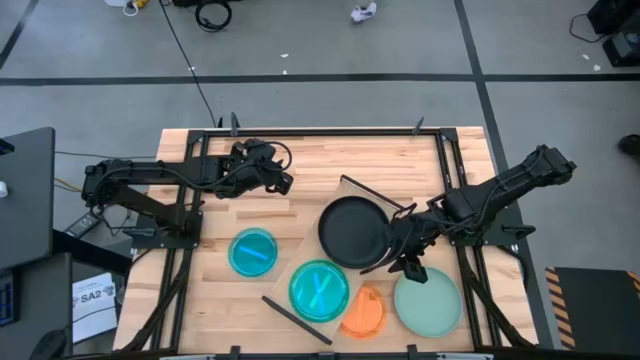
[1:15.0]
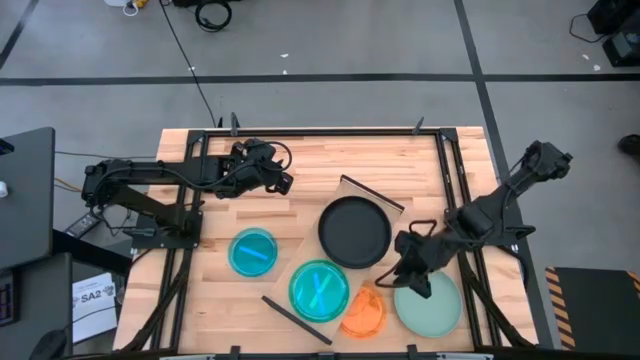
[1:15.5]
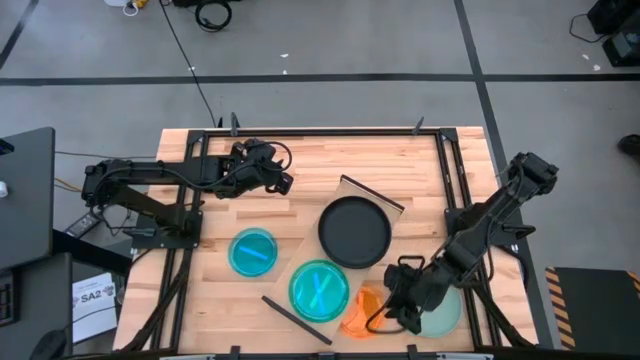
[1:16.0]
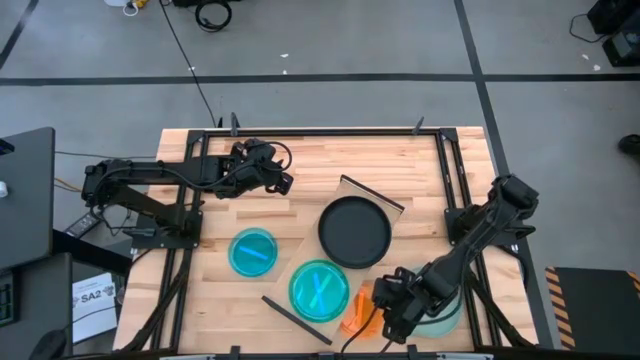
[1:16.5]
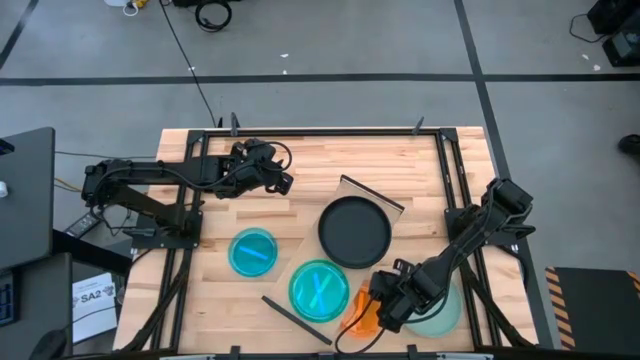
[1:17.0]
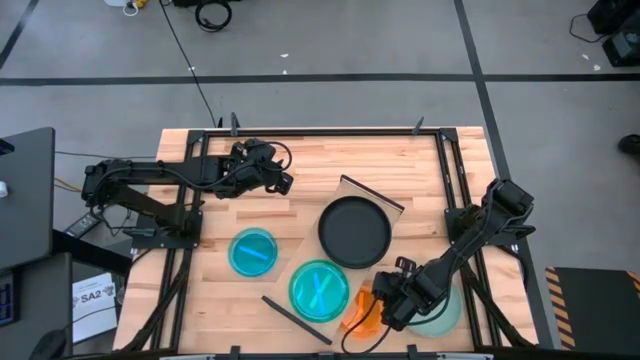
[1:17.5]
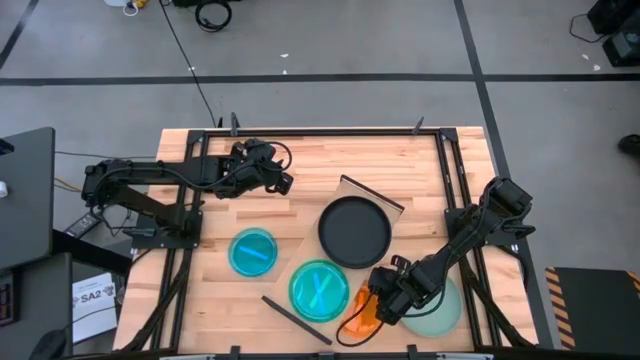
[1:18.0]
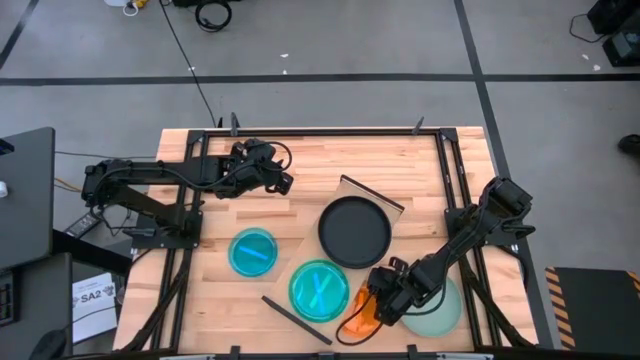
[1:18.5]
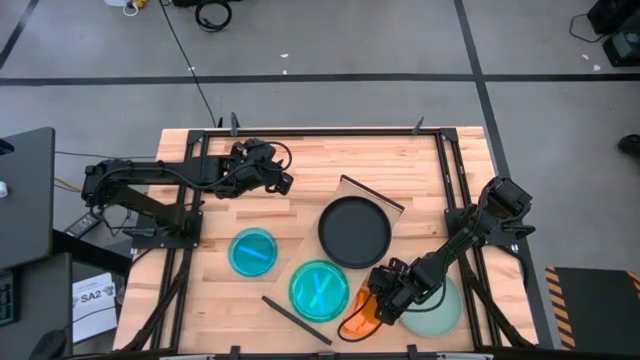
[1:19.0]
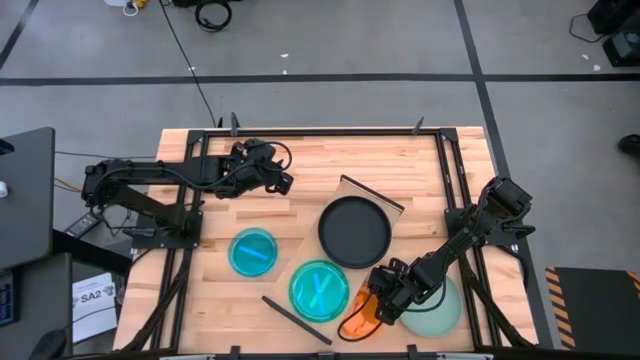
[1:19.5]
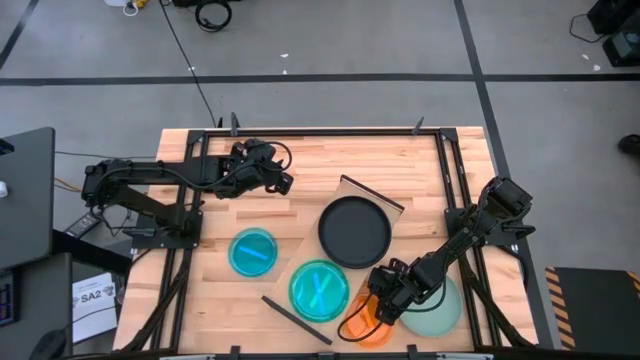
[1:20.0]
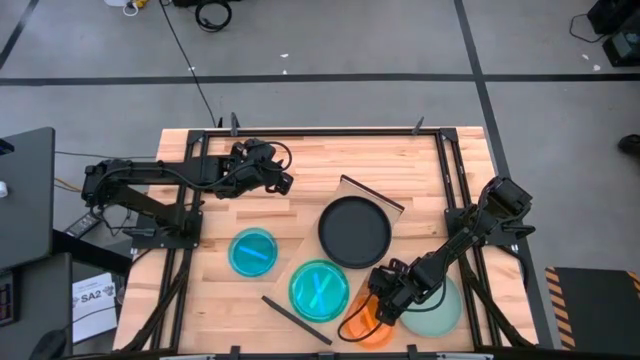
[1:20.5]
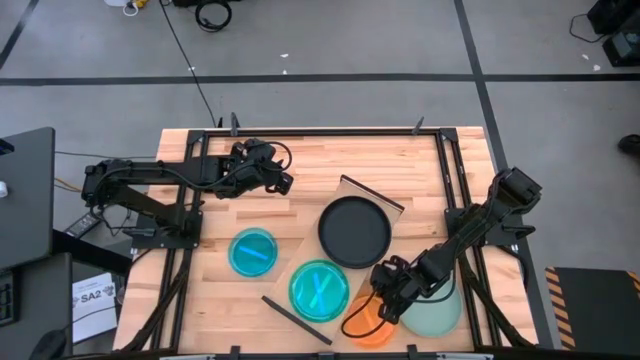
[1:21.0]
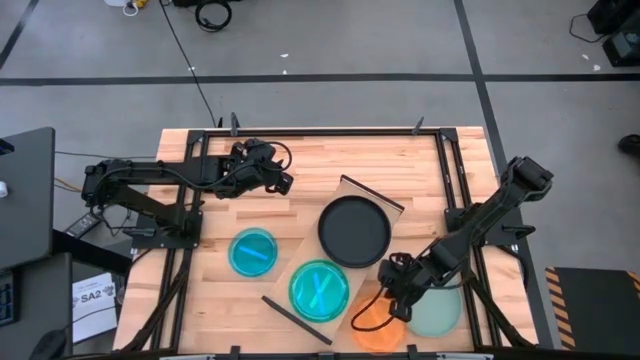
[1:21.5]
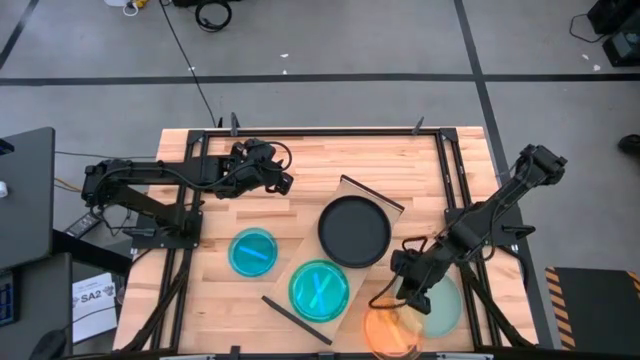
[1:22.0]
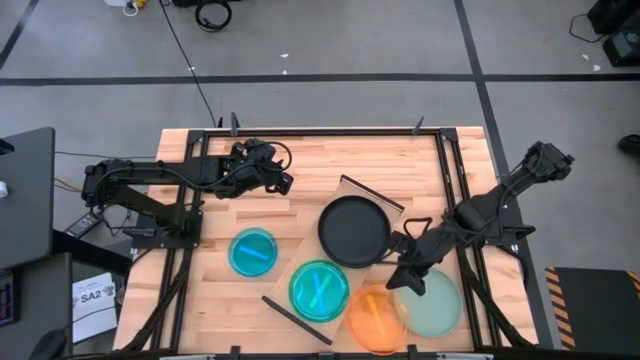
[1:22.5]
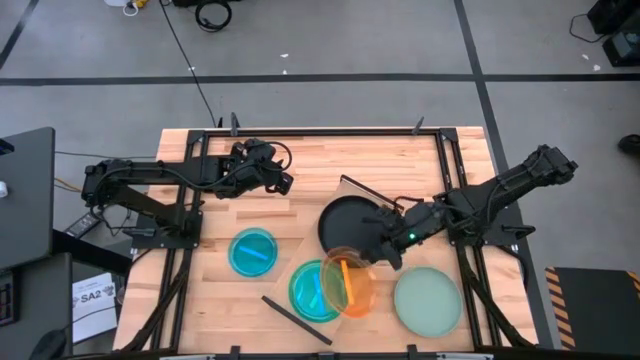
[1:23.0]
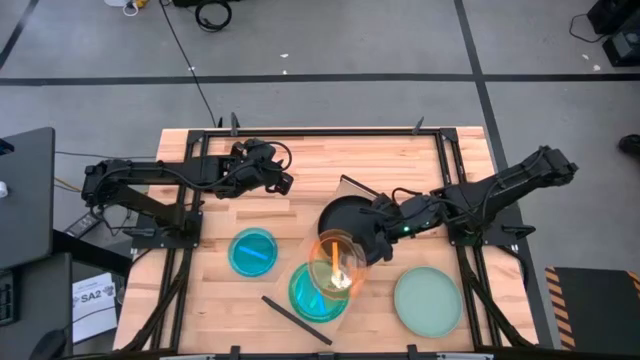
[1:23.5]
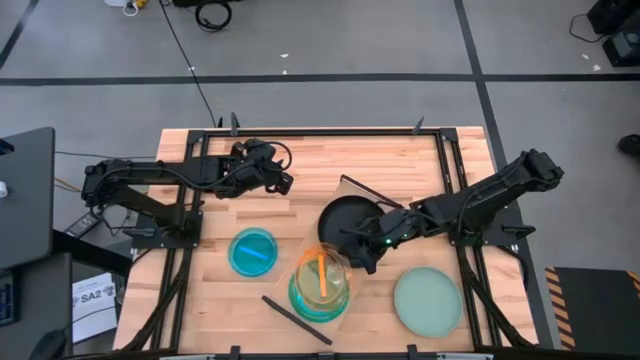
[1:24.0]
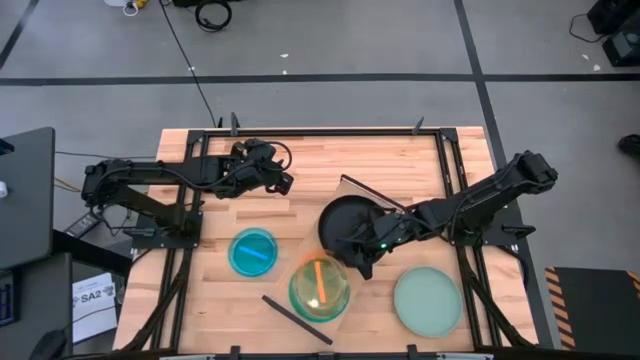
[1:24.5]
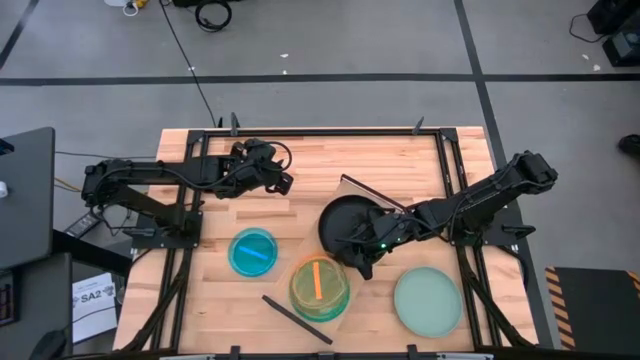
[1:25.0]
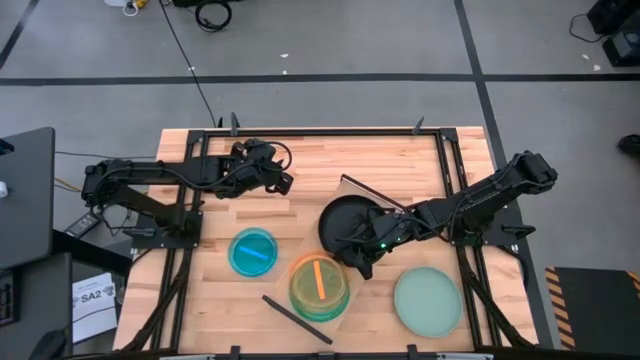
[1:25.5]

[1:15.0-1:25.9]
Task: Place and stack plates onto a shelf
Stack the orange plate on top of the blue plate on the shelf

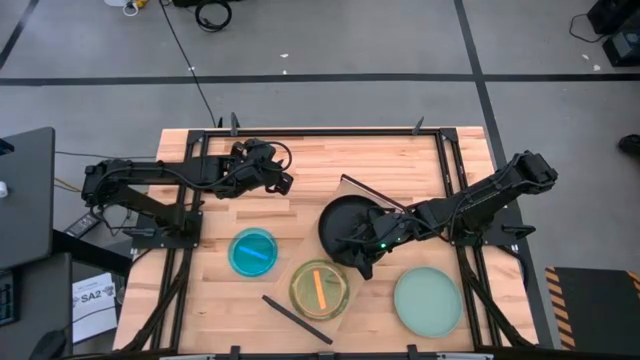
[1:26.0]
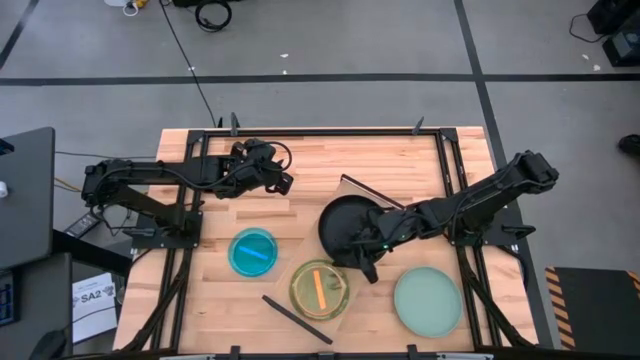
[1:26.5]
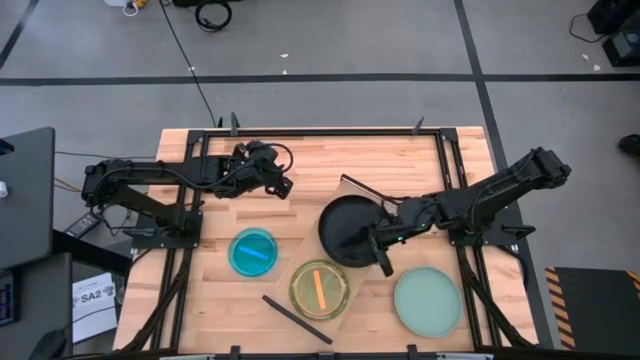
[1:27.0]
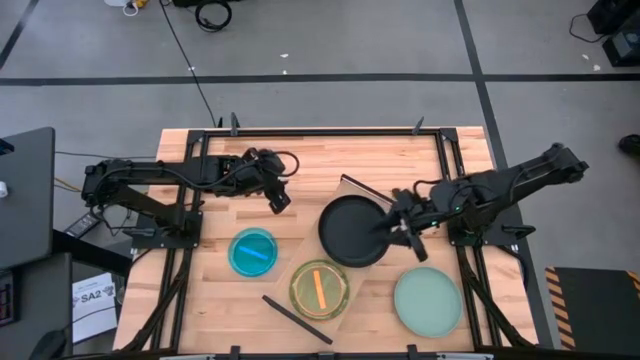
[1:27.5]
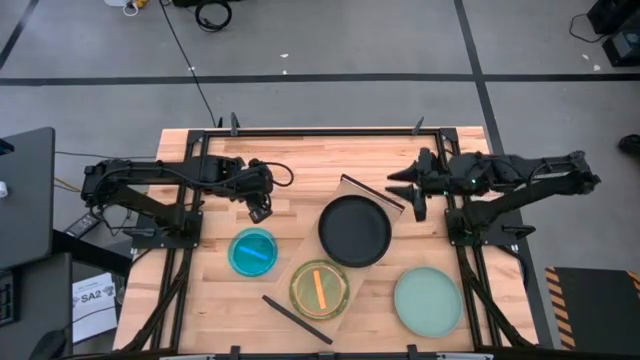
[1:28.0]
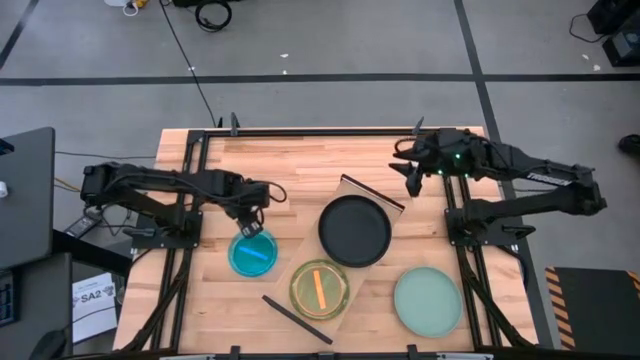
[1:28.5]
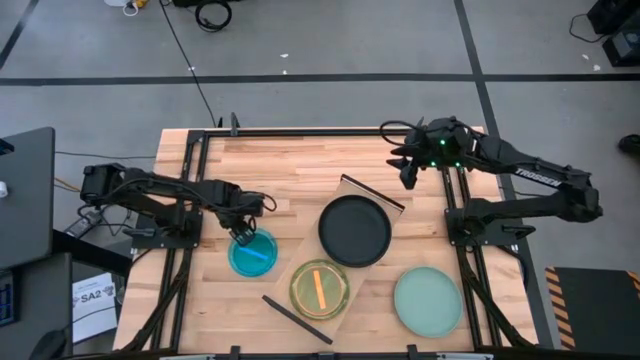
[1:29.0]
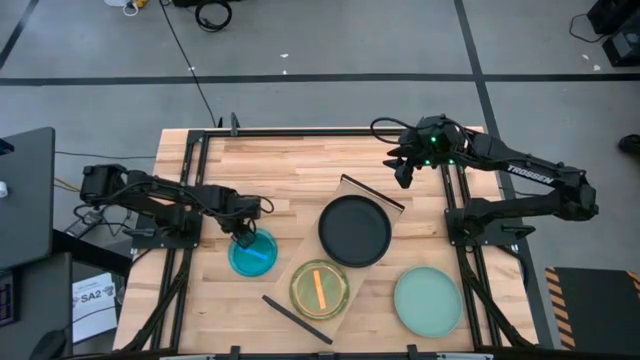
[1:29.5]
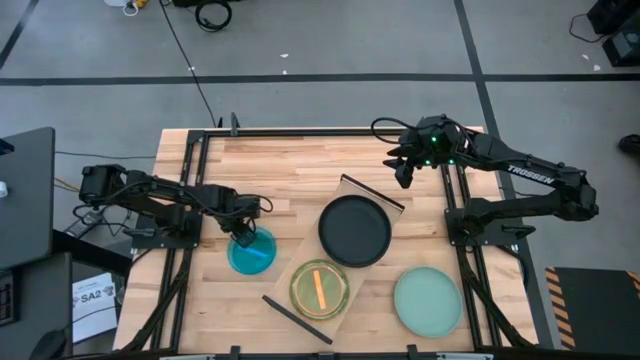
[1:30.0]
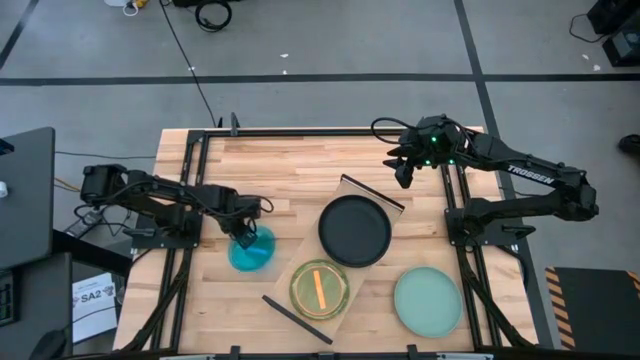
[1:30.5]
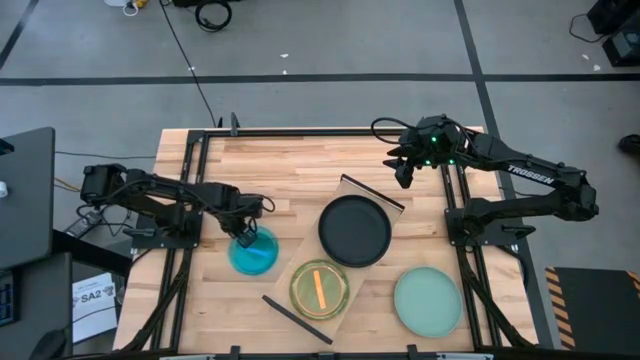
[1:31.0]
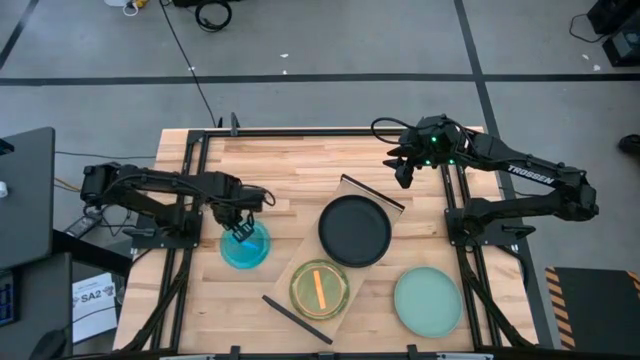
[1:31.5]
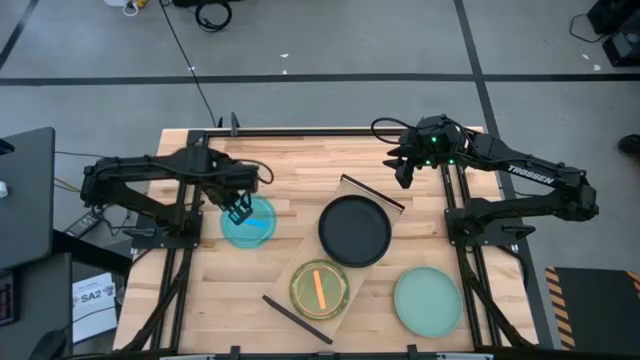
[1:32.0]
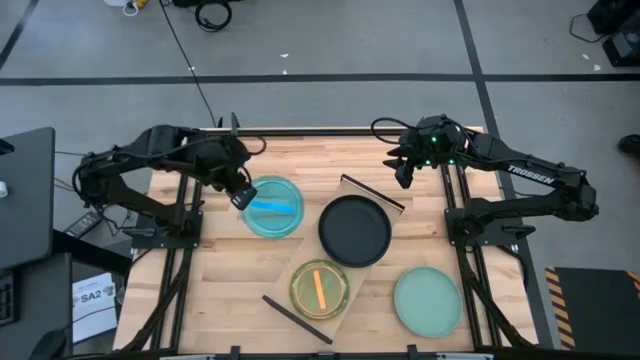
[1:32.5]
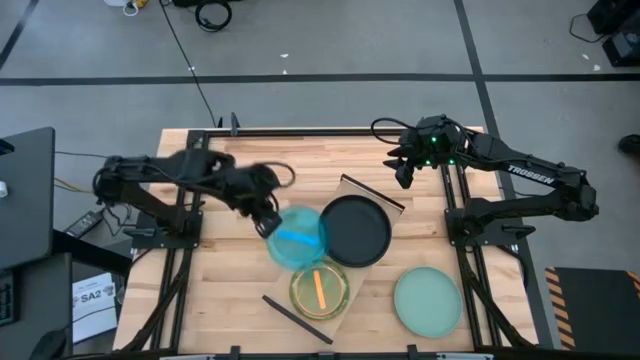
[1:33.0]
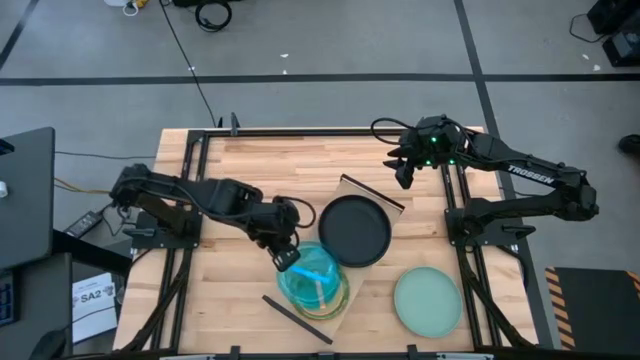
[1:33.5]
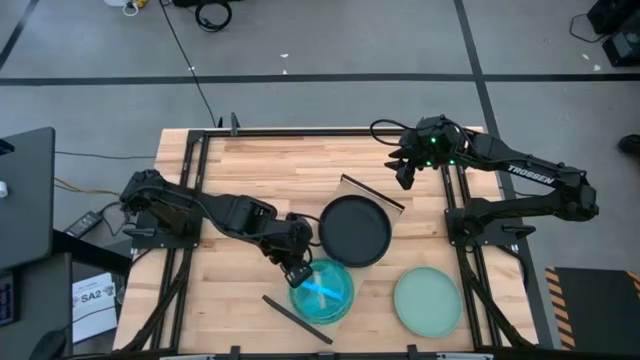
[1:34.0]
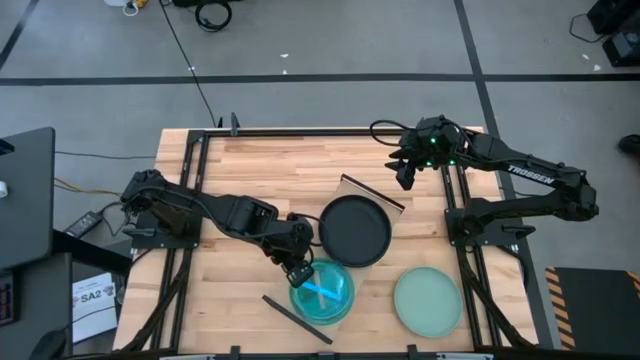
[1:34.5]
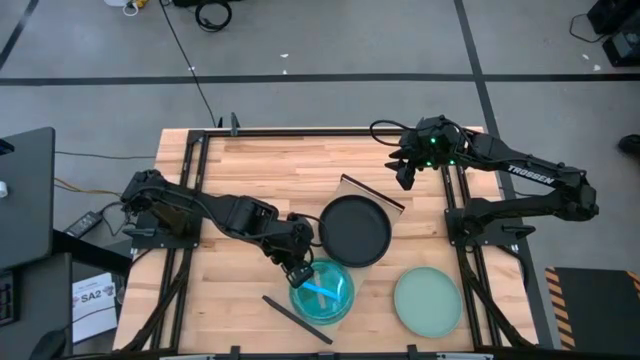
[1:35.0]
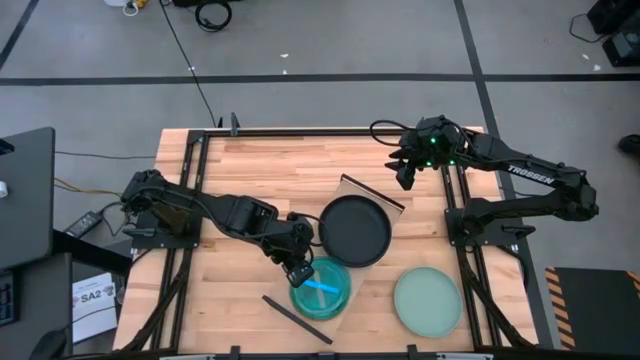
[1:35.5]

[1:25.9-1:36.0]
Stack the blue plate on top of the orange plate on the shelf
